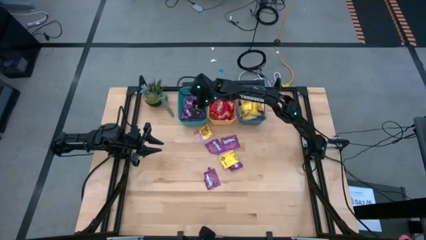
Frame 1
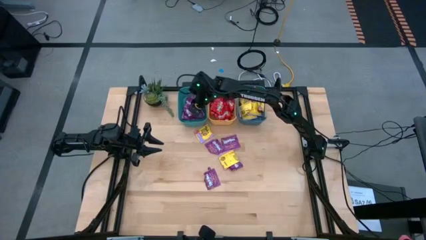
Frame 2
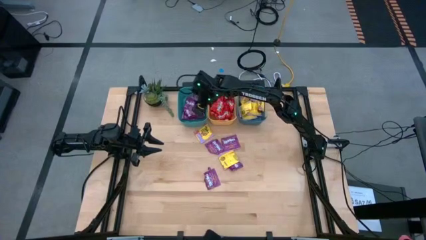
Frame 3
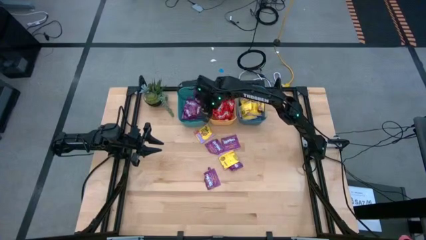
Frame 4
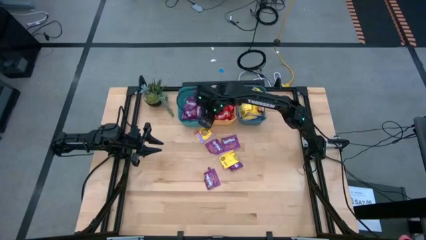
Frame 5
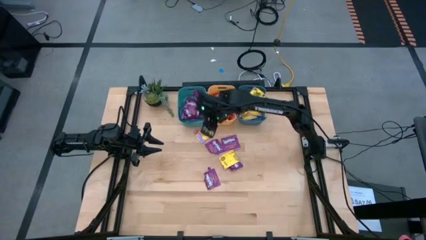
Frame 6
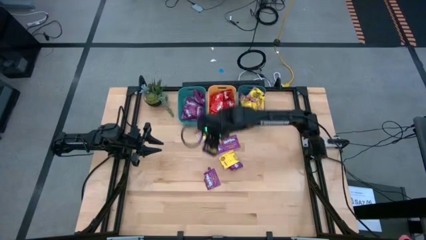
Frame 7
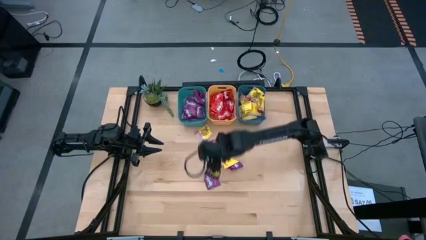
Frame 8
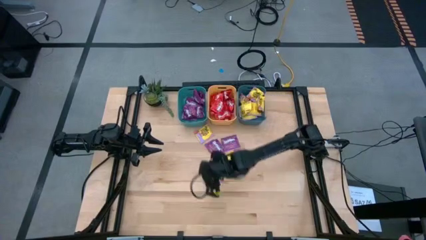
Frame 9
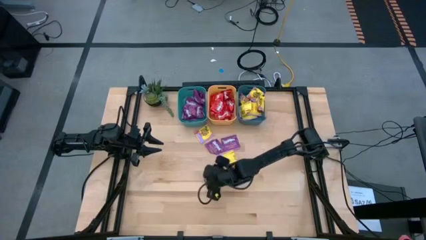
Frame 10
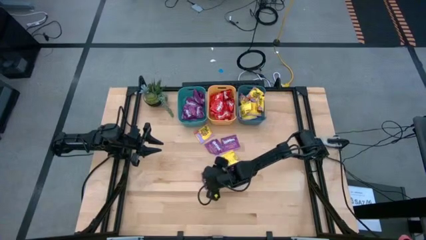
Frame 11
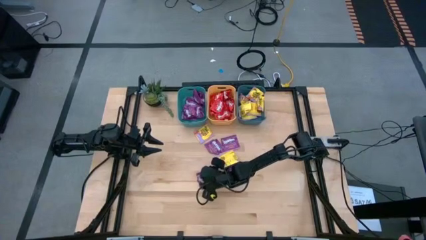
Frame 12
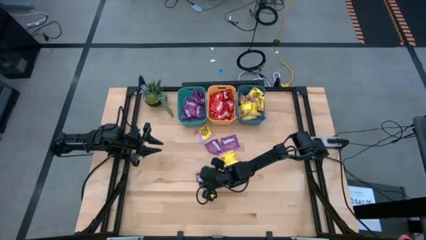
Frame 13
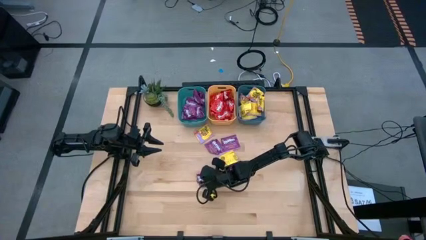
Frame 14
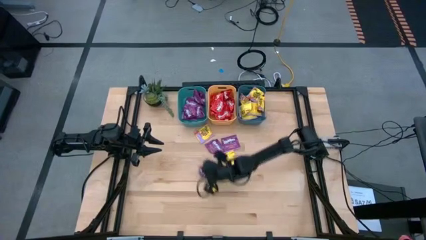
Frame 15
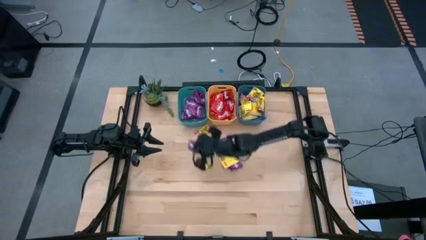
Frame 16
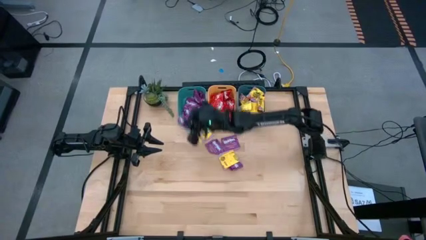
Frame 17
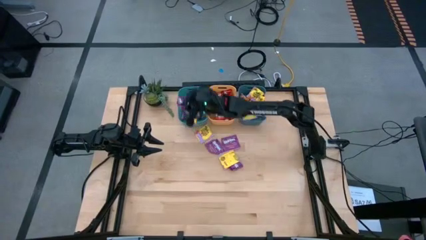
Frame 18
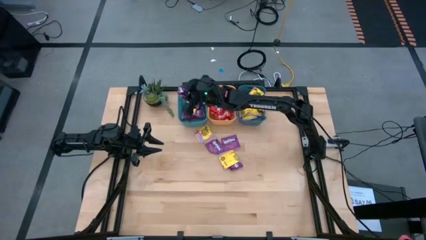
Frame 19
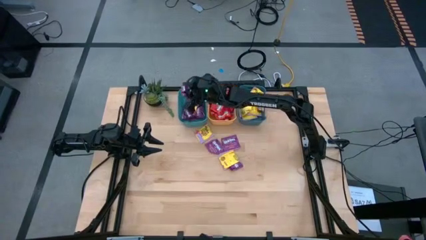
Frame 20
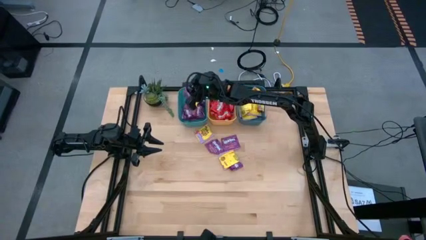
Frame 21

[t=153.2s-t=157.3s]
Task: Sort candy
Put the violet candy into the blue bin

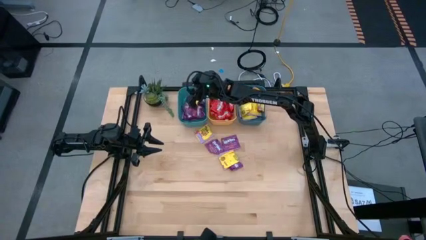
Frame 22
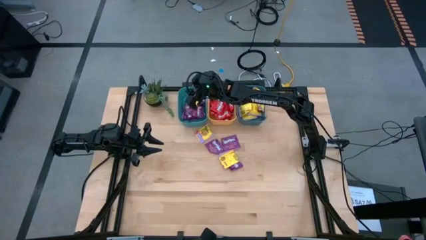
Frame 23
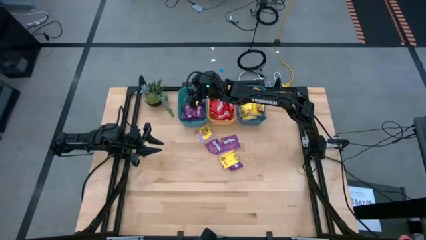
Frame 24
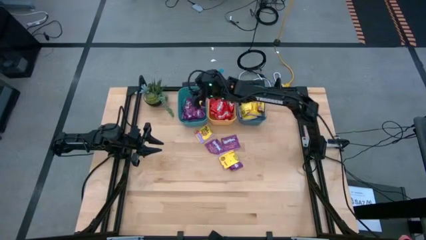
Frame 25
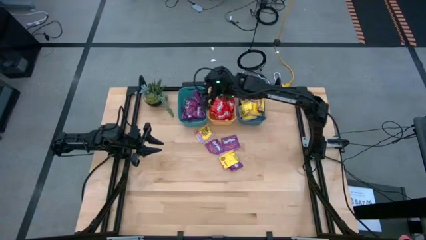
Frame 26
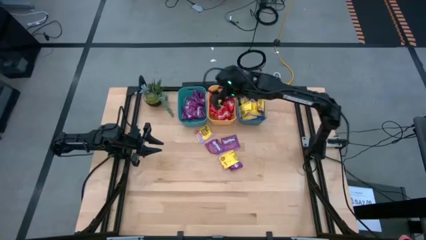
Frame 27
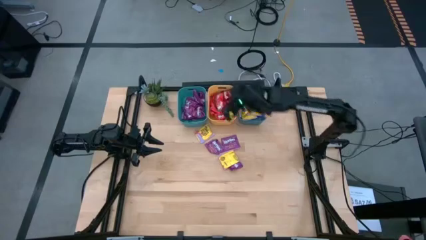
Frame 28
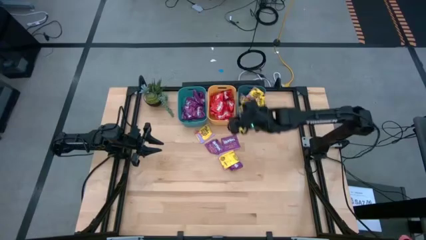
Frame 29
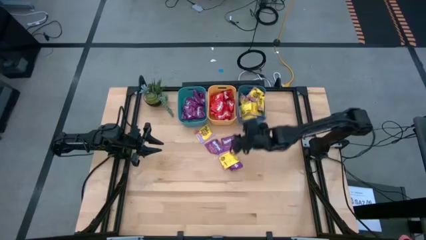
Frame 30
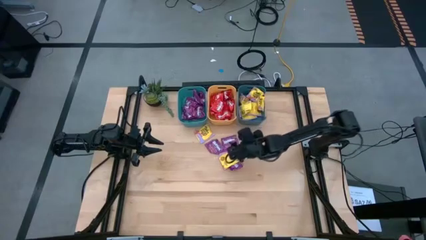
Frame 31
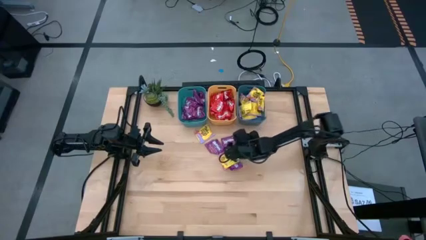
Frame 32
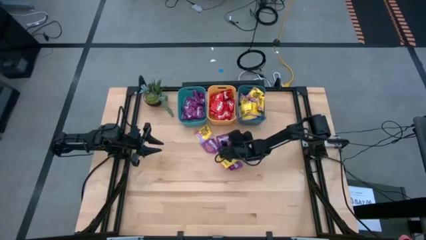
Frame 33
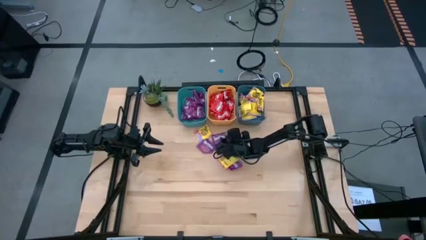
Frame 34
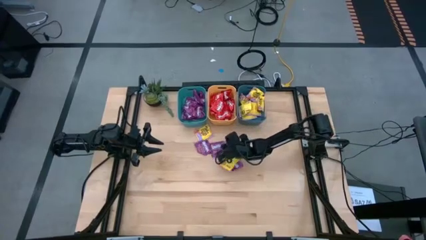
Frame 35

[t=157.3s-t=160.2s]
Put the violet candy into the blue bin

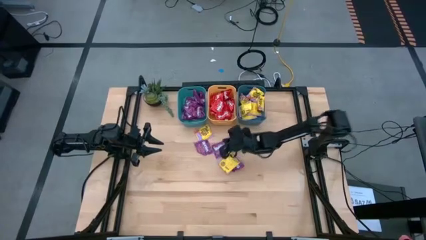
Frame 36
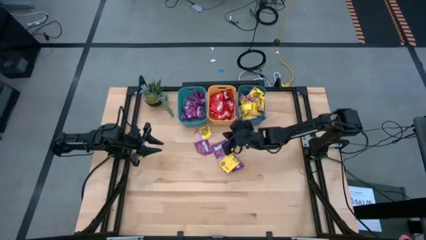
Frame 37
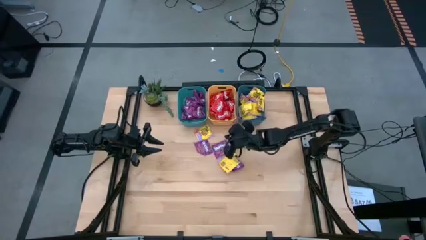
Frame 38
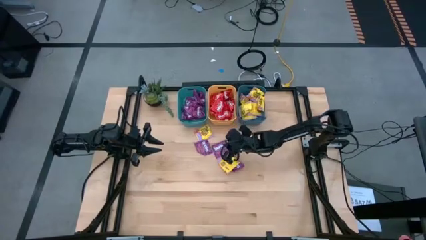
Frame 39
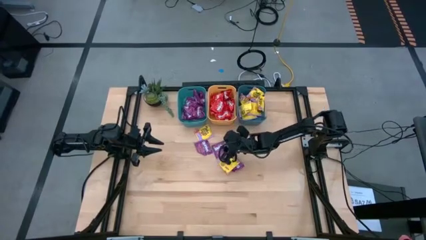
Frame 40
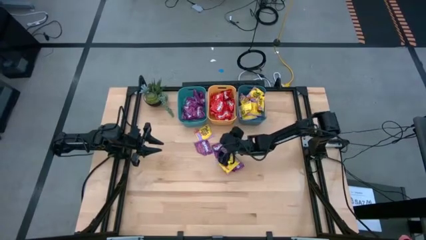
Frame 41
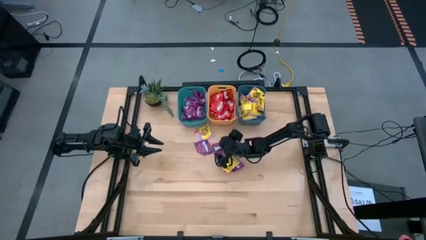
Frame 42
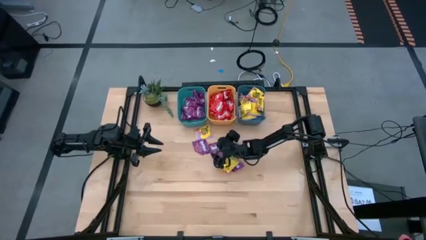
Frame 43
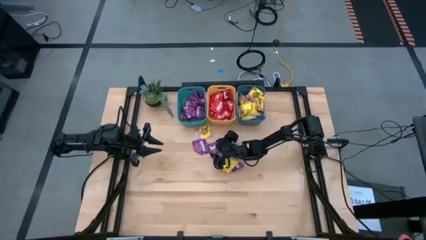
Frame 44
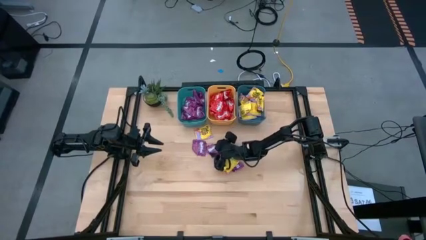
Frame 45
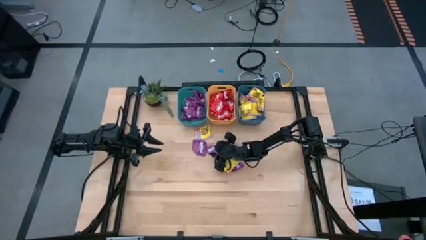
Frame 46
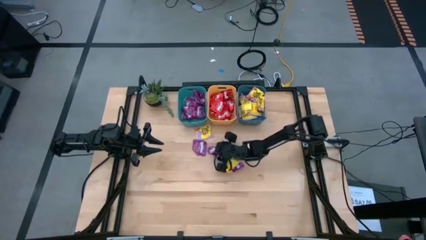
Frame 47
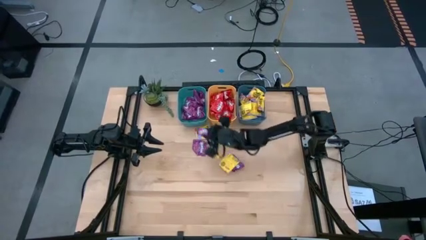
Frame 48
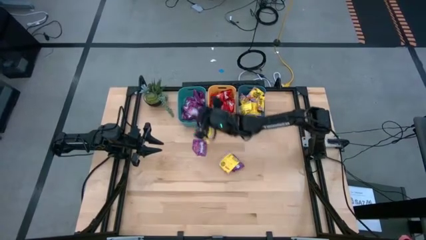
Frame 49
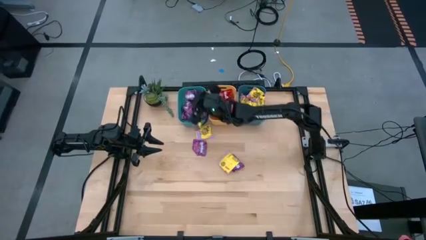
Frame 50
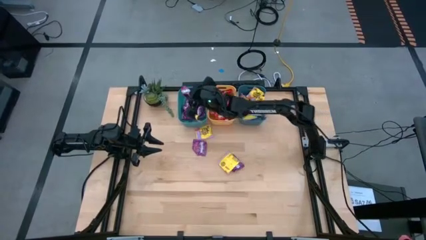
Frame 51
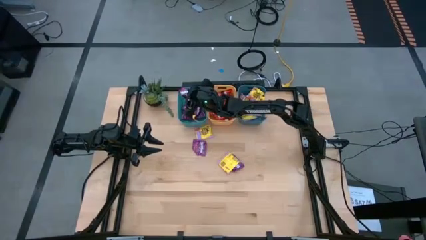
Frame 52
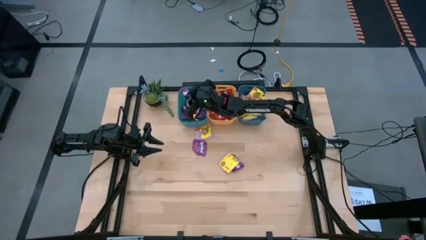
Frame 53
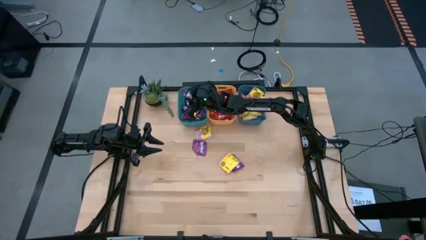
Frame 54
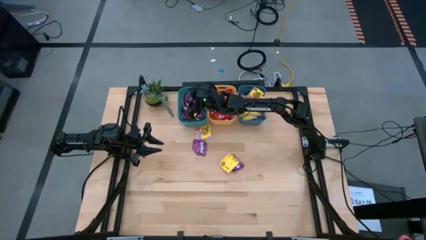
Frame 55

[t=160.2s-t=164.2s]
Put the violet candy into the blue bin

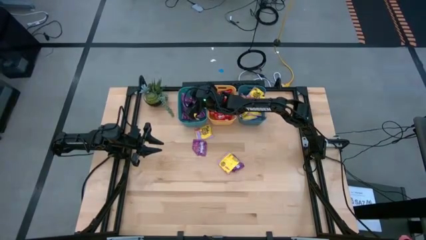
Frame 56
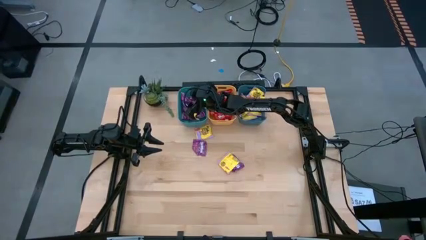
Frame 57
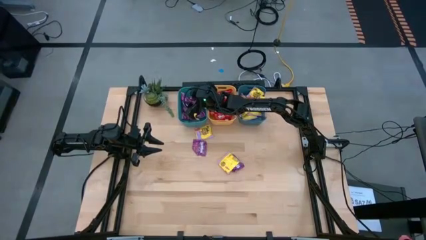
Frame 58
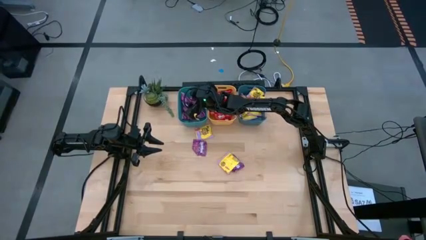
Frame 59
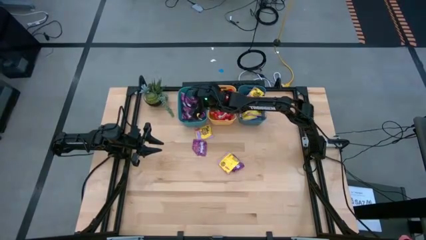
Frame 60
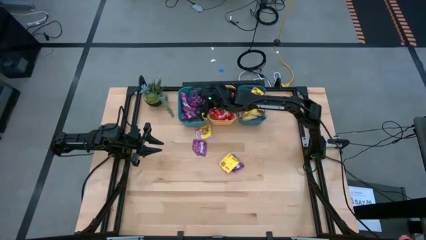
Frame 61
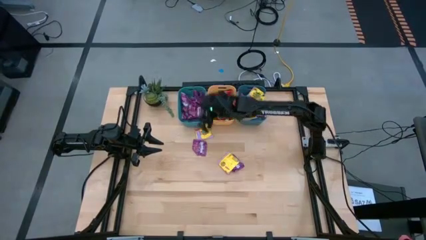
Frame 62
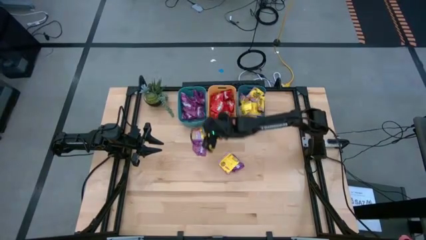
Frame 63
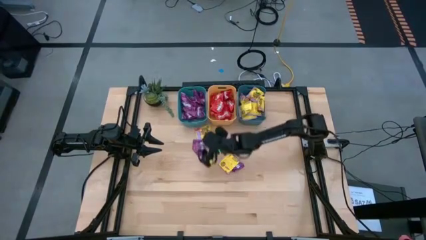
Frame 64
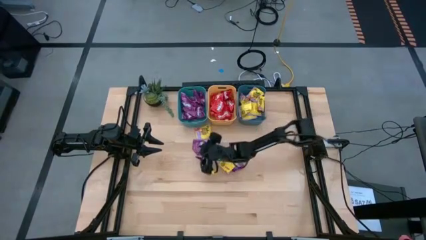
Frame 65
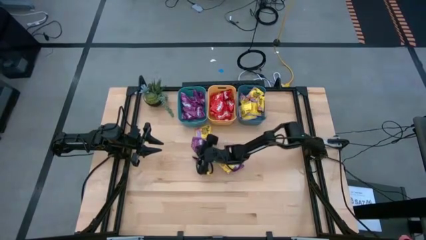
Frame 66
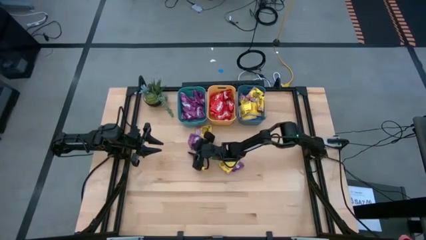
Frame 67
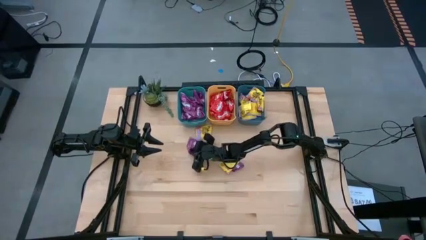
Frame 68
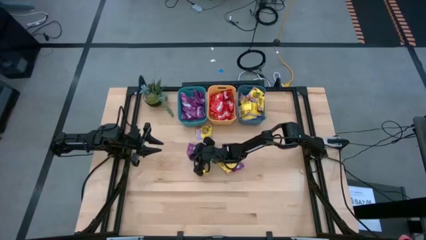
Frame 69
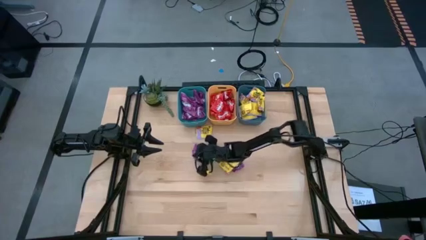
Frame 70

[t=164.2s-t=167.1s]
Put the violet candy into the blue bin

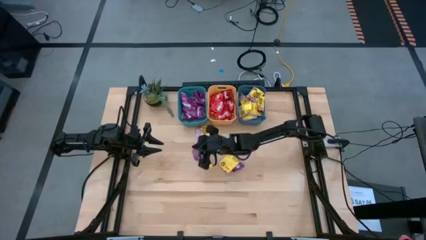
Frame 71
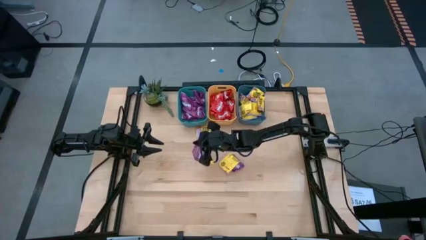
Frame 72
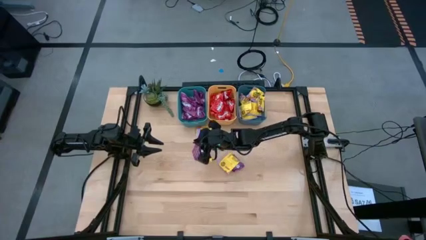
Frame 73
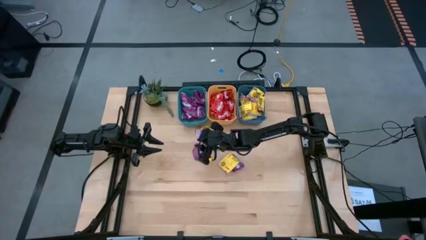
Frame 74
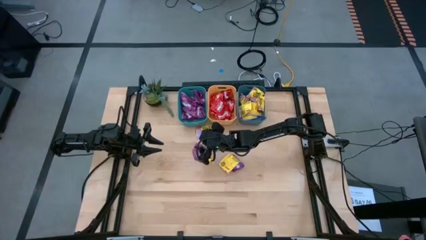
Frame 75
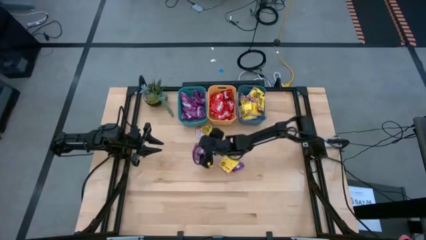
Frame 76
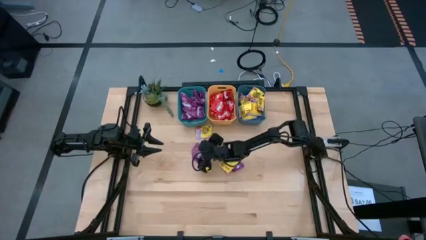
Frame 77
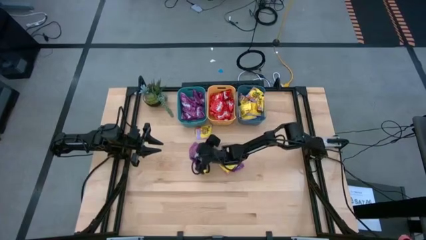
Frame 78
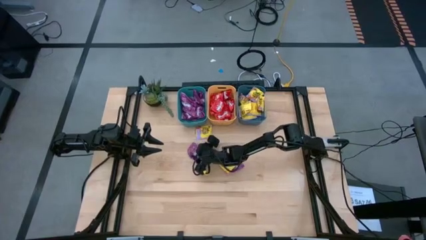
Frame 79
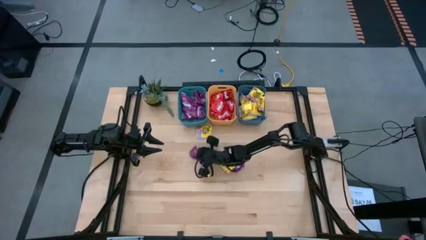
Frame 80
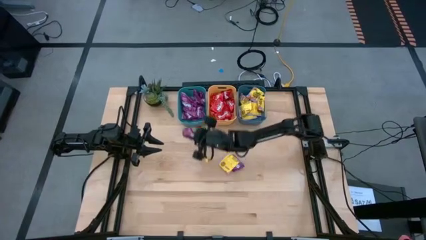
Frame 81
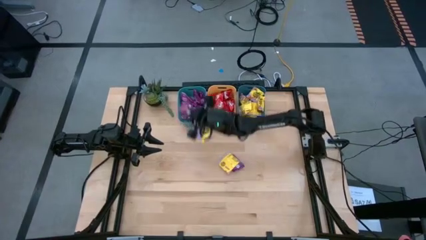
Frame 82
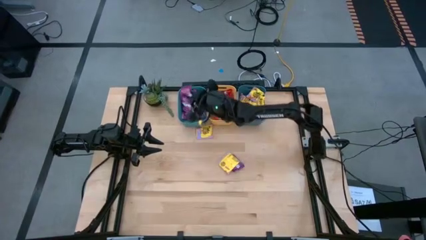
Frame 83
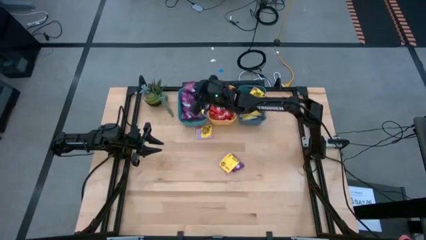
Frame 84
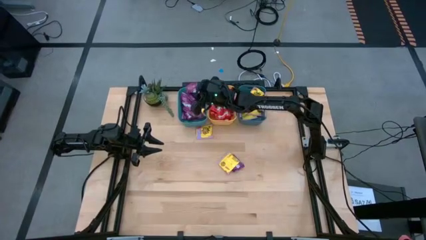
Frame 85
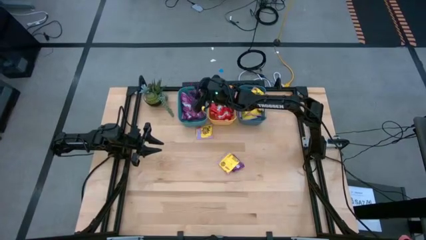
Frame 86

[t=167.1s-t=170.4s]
Put the violet candy into the blue bin
